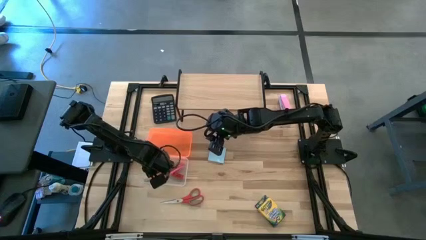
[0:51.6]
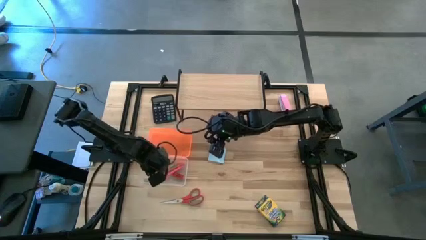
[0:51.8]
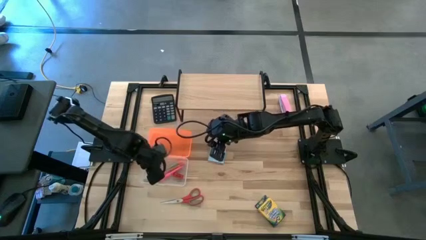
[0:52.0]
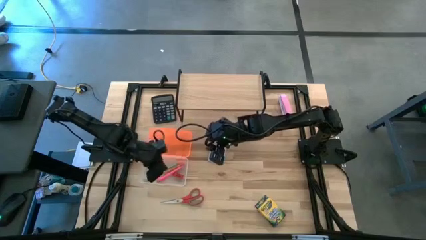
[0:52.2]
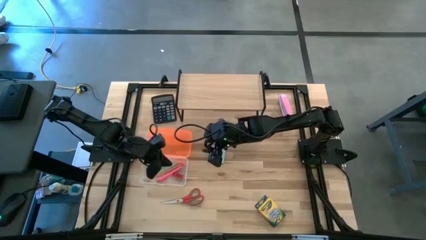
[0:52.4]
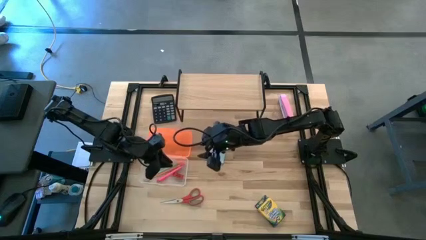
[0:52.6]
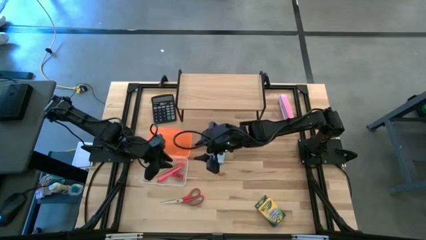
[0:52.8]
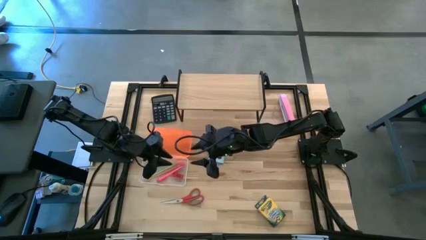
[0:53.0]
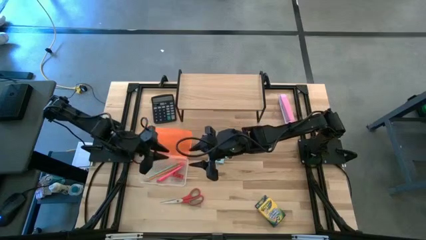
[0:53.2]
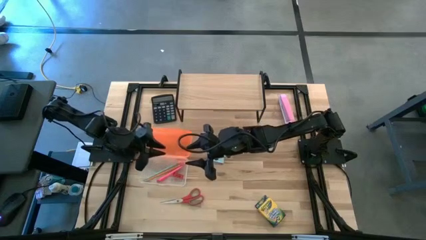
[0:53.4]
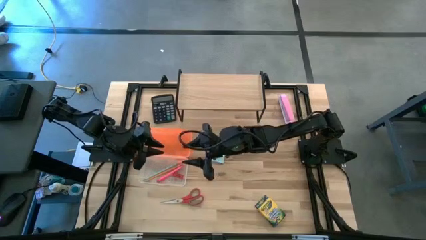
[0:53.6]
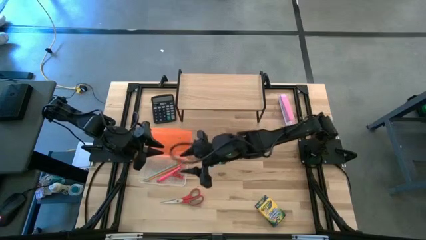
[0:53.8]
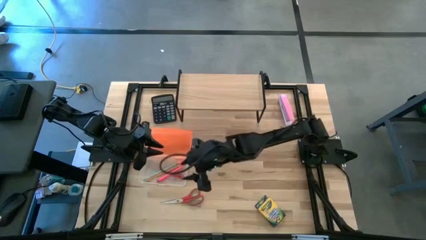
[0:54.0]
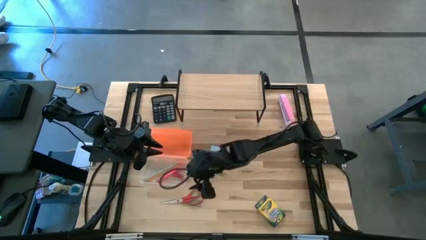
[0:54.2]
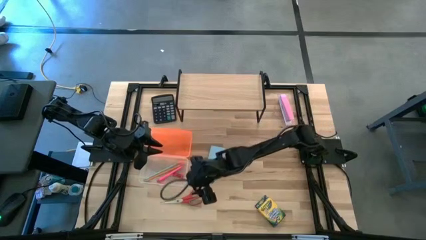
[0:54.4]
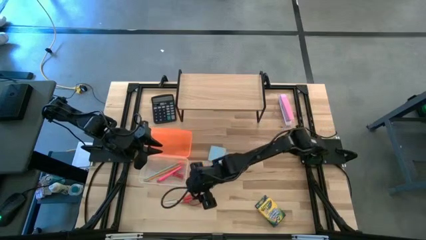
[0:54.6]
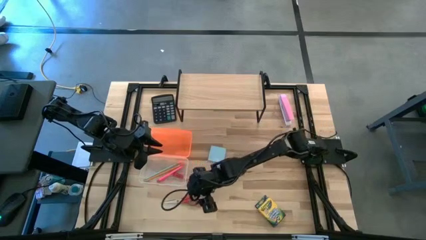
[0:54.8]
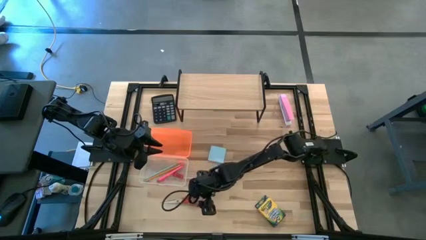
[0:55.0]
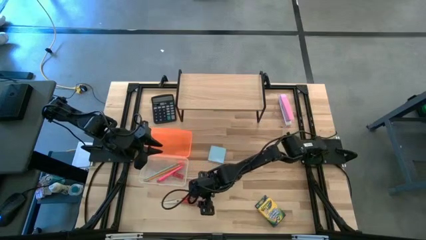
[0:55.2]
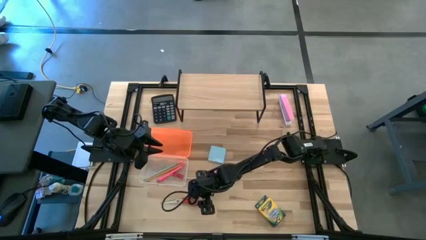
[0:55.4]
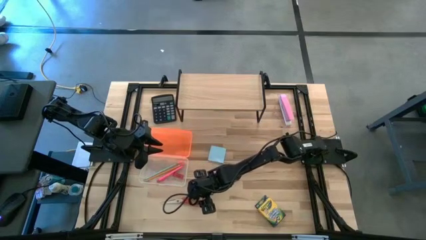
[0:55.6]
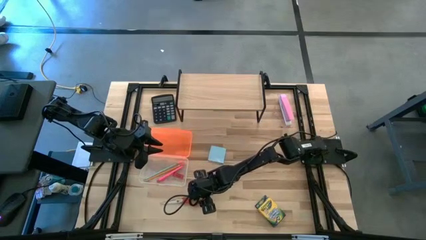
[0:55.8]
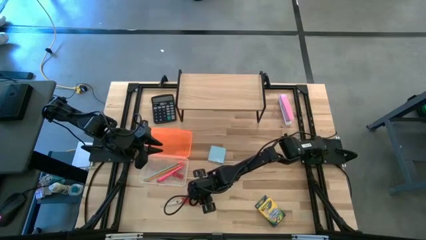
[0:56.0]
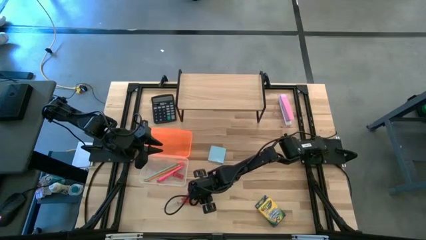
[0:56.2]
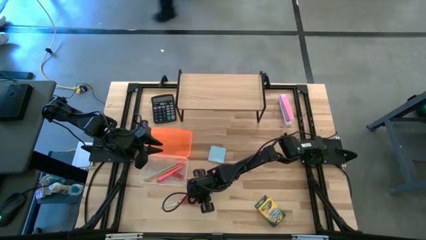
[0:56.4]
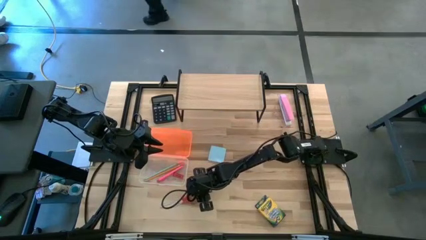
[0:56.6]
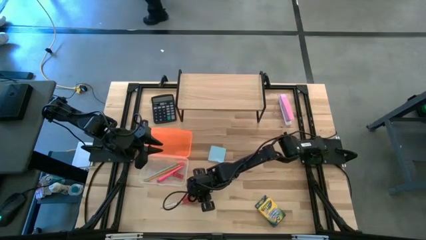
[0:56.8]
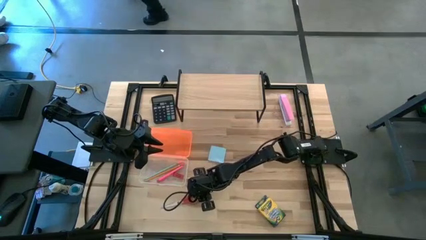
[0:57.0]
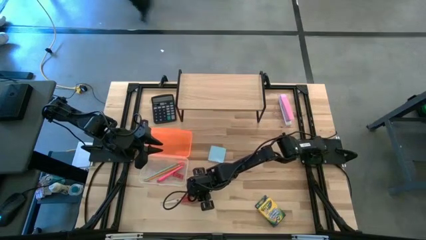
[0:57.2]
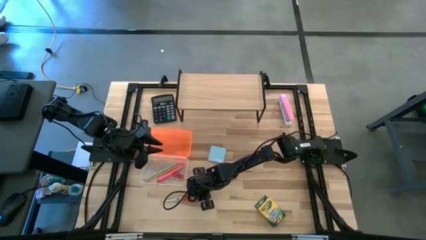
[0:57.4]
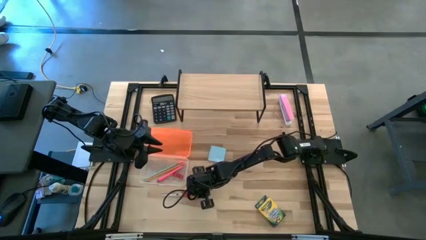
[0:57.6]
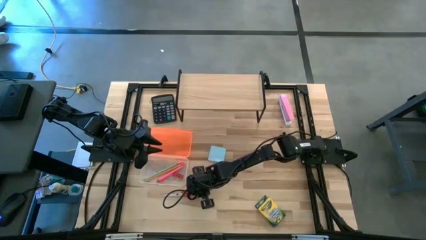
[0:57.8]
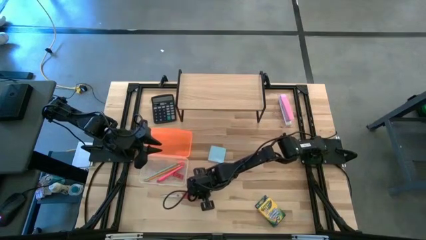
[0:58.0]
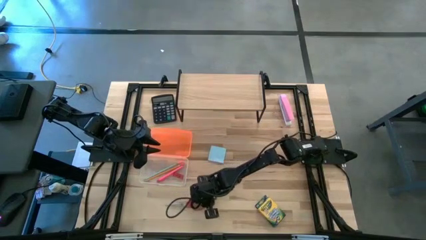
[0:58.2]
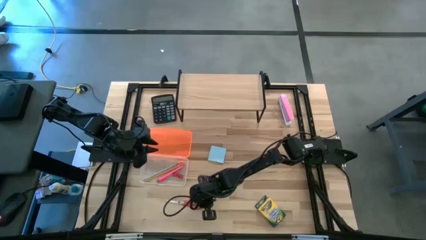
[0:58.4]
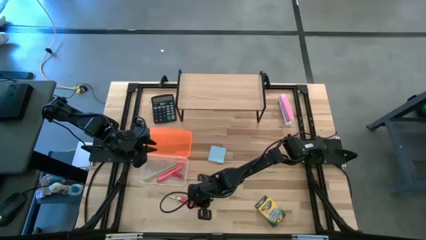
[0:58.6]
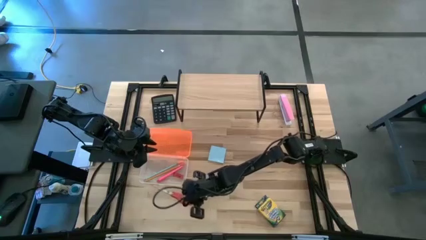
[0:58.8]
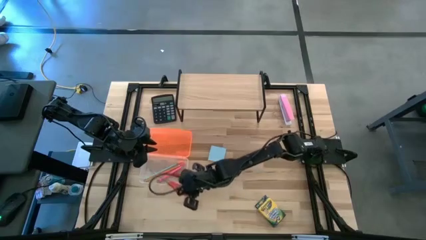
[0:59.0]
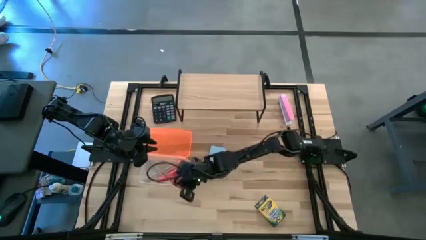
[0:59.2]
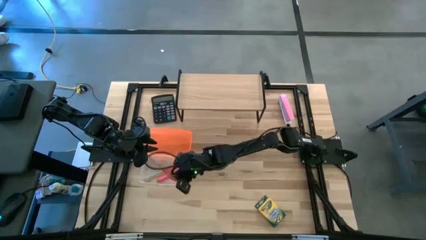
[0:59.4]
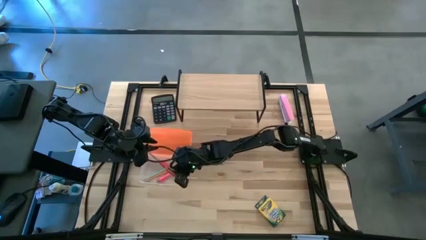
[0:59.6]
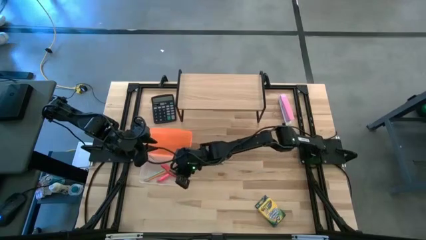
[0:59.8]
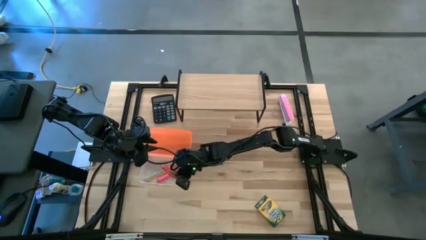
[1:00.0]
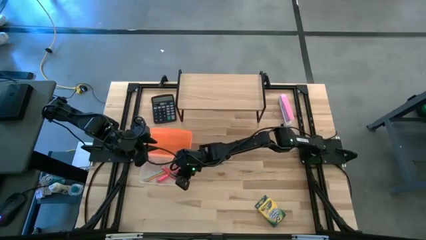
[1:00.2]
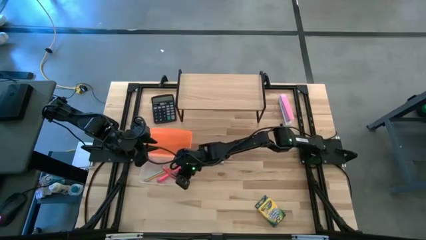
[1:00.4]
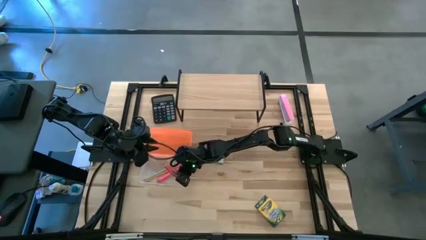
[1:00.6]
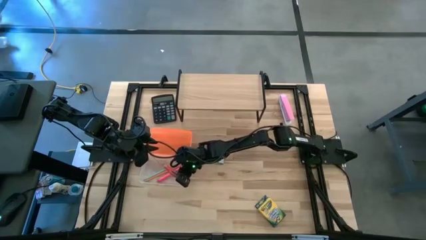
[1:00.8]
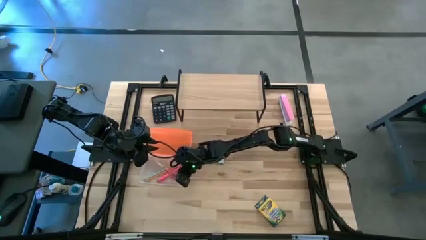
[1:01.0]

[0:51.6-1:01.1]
Task: Pack school essentials
Put the red scissors into the supply box

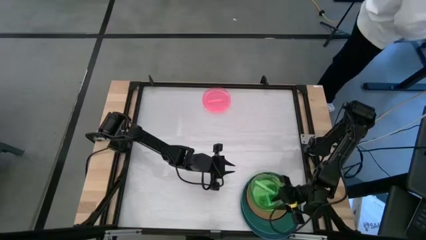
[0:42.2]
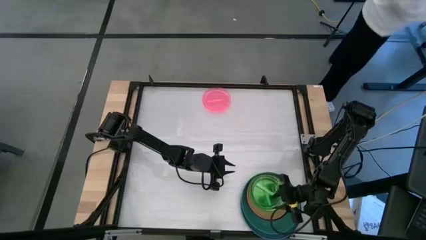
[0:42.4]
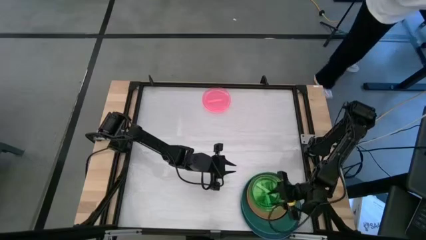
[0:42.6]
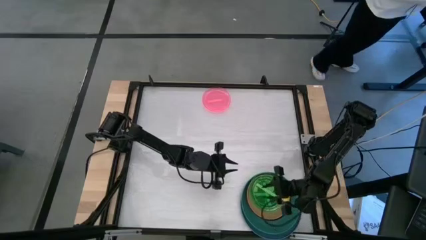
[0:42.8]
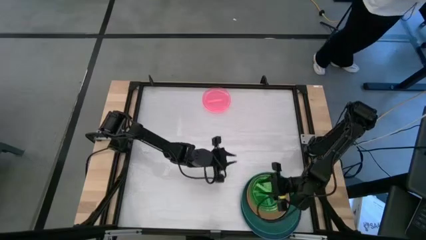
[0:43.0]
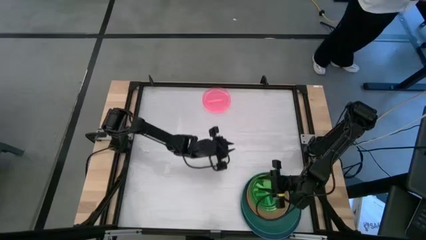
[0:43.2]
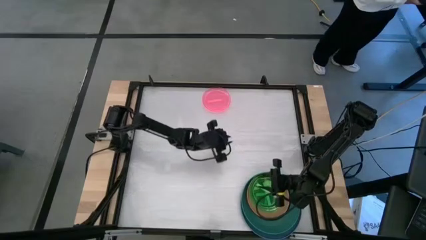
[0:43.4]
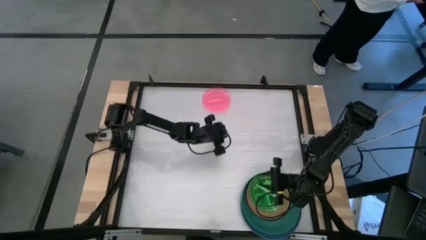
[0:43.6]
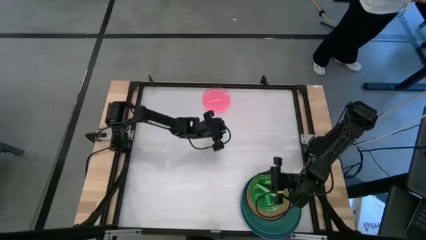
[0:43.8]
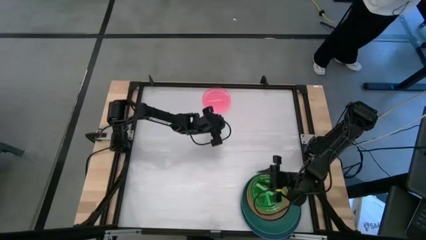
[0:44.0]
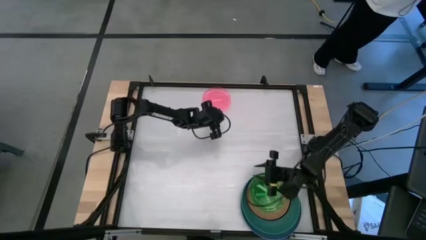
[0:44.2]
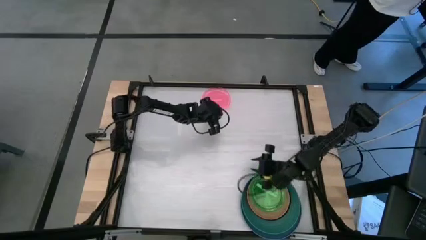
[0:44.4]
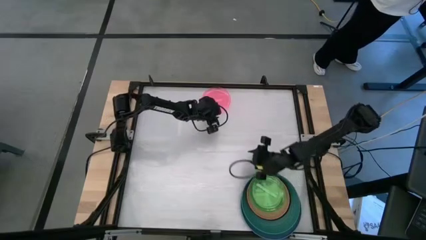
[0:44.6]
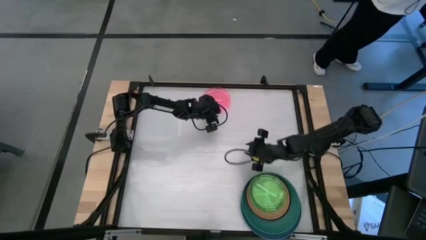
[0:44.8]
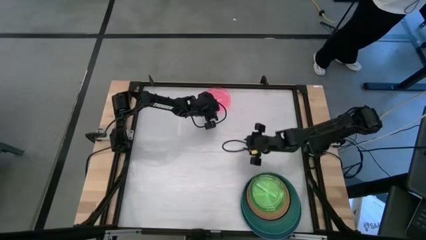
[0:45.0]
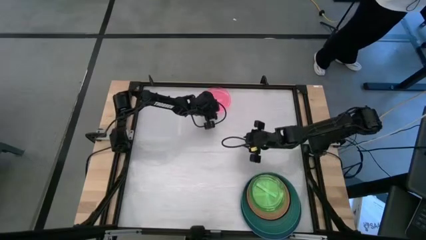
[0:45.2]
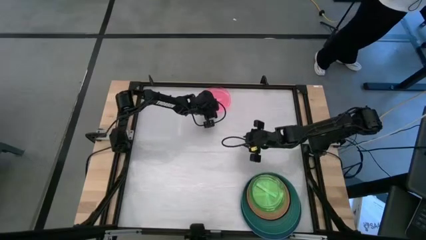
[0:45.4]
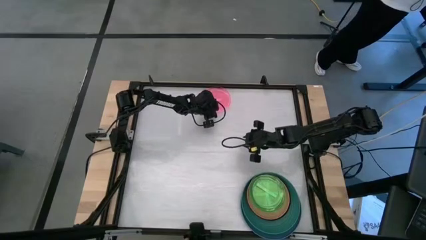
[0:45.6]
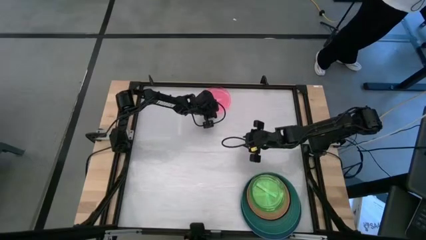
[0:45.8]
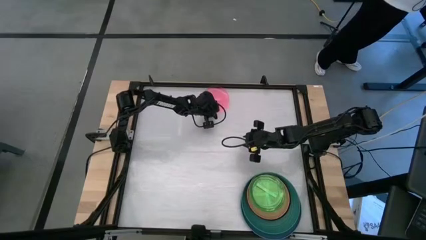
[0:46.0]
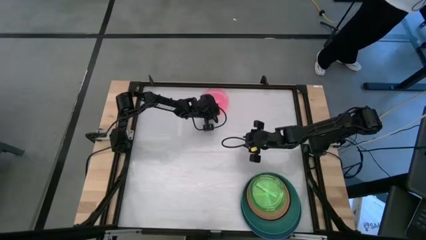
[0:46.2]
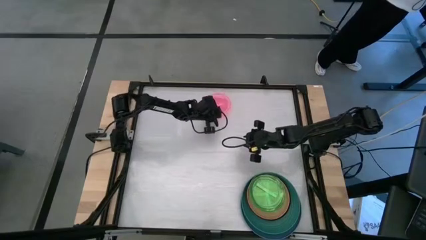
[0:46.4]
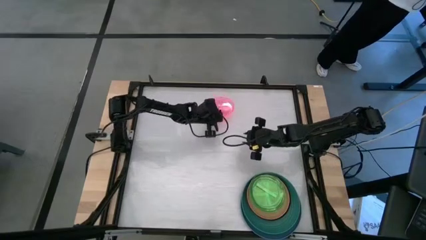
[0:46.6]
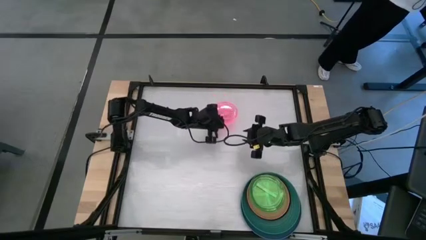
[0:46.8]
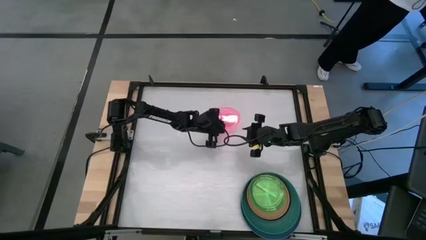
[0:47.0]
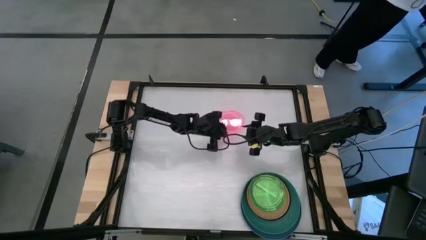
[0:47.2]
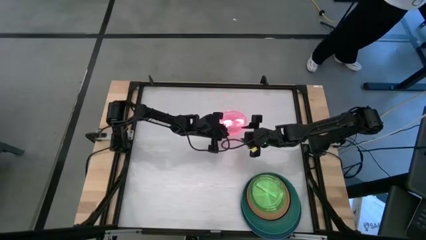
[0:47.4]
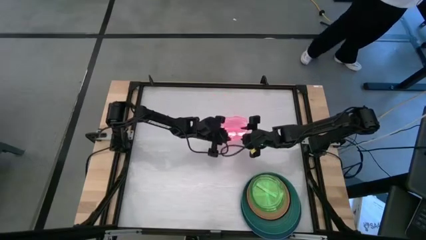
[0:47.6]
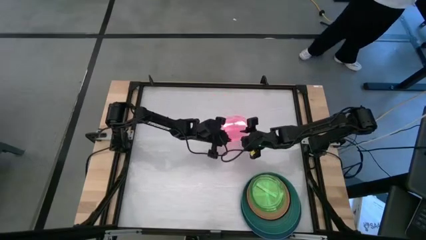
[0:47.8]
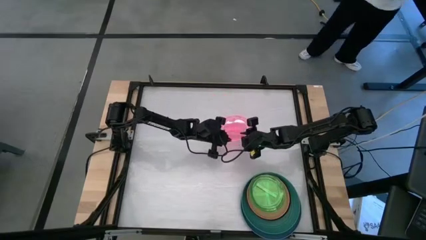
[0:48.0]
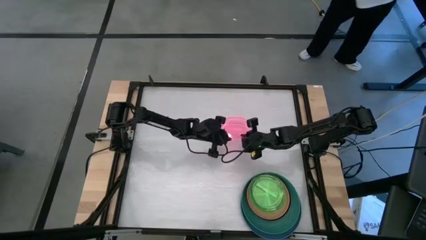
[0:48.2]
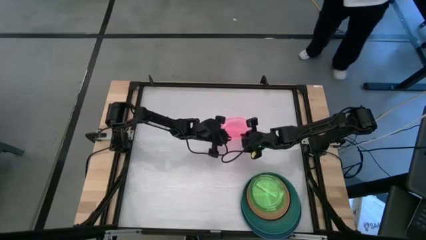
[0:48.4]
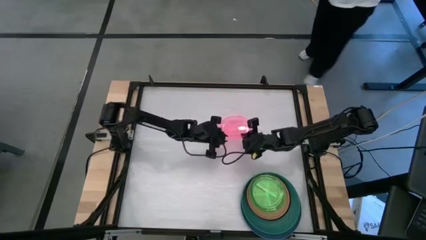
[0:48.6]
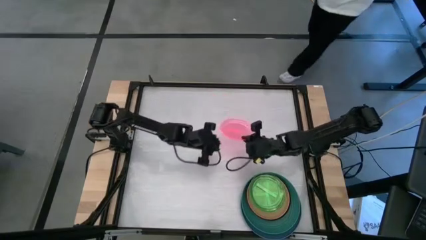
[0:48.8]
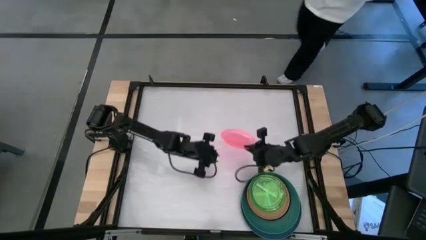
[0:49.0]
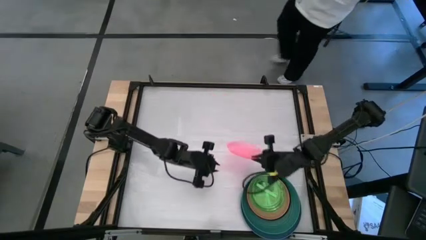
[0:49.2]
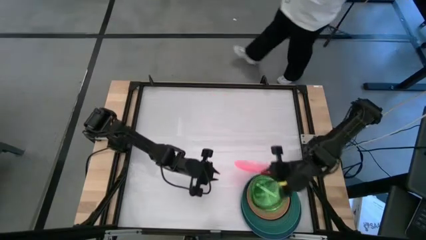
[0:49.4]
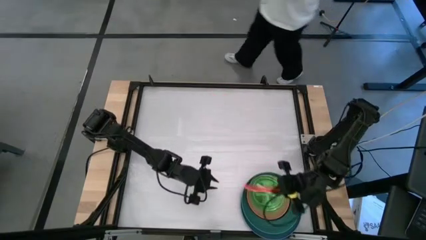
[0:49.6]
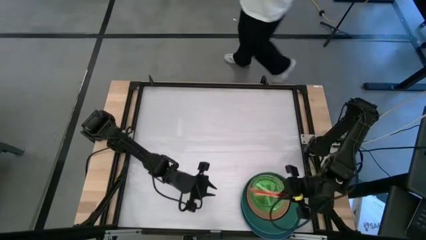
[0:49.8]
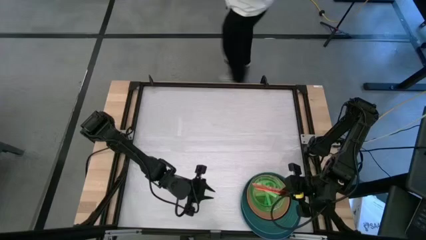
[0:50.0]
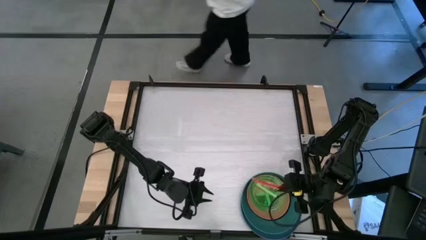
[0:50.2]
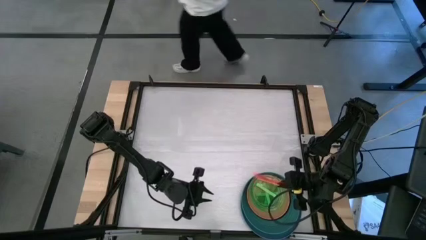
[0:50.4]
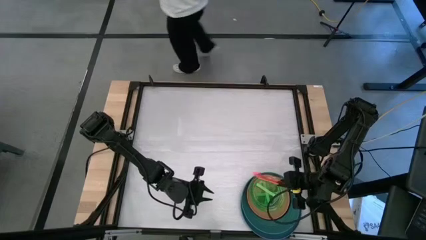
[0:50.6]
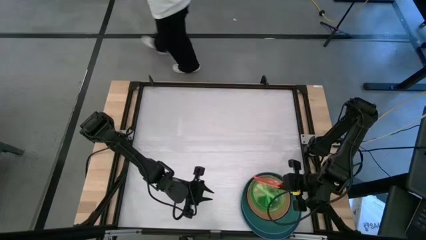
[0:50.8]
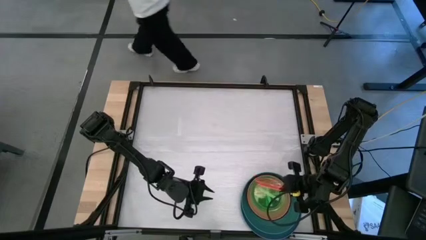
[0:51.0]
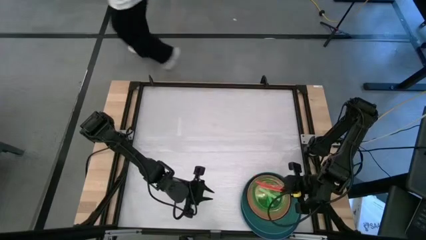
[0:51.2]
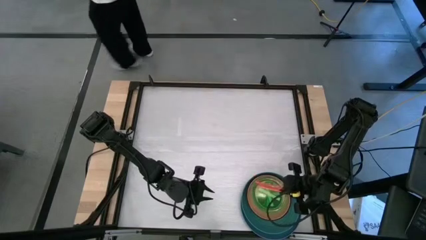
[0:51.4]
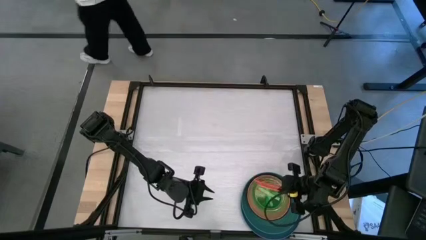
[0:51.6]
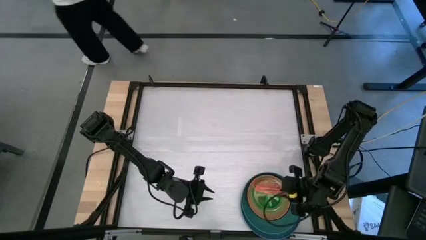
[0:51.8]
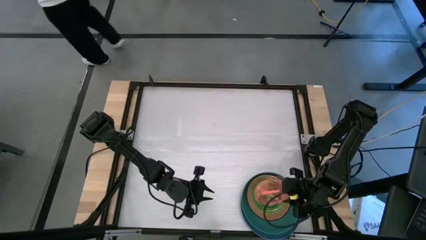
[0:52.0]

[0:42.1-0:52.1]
Task: Stack plastic plates
Stack the pink plate on top the light green plate
